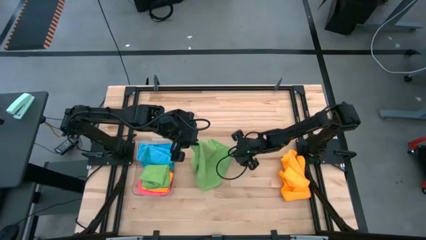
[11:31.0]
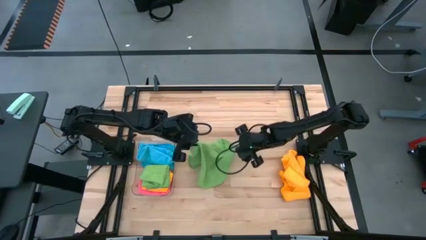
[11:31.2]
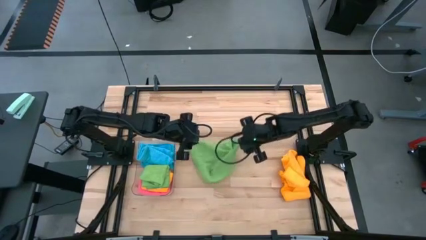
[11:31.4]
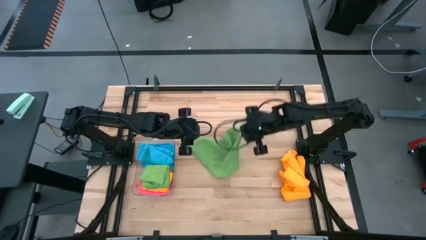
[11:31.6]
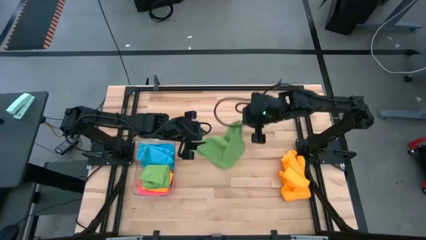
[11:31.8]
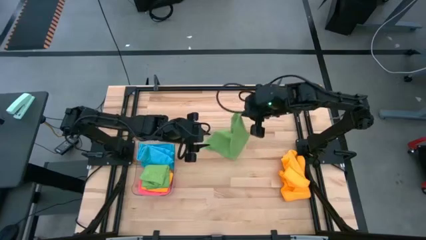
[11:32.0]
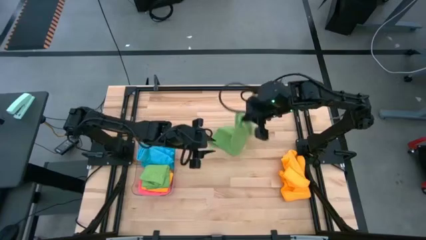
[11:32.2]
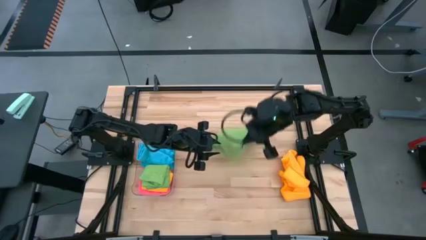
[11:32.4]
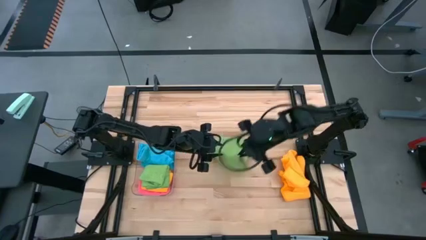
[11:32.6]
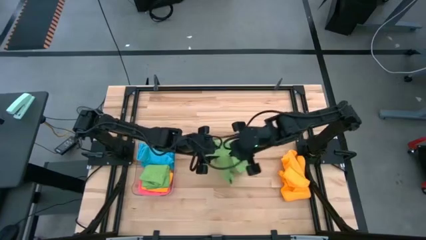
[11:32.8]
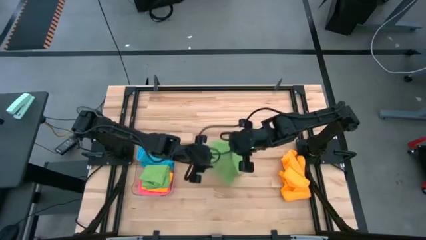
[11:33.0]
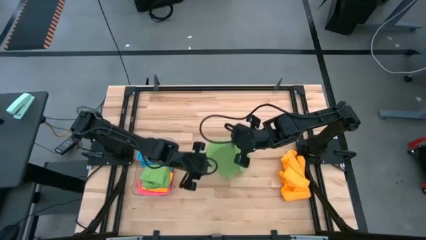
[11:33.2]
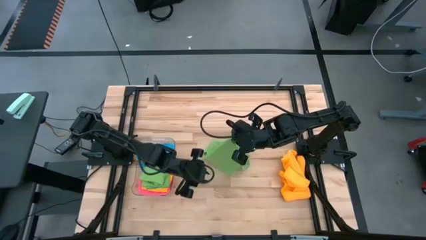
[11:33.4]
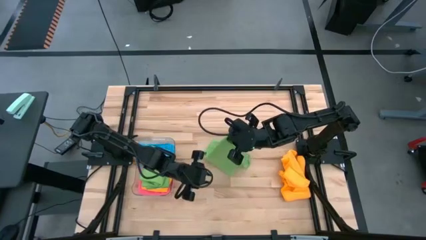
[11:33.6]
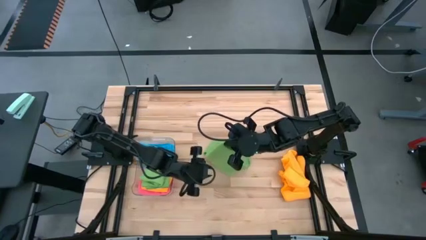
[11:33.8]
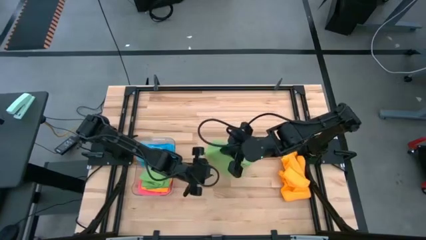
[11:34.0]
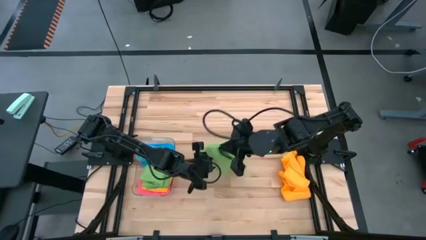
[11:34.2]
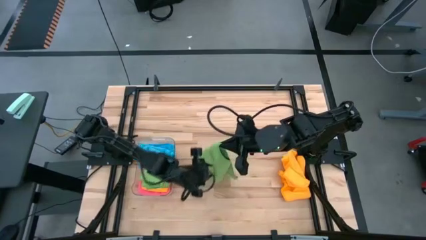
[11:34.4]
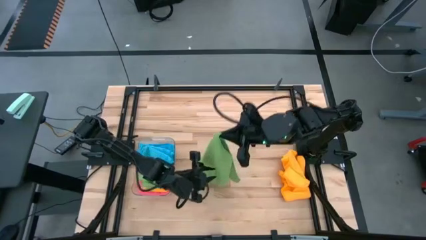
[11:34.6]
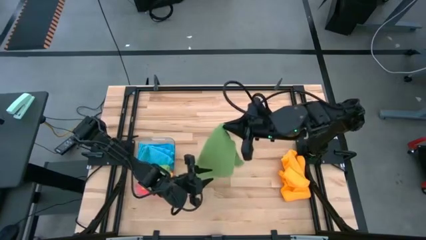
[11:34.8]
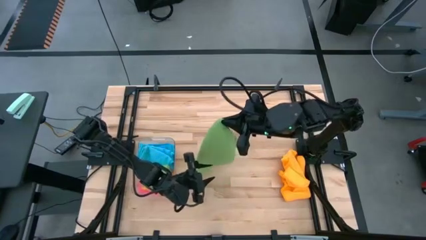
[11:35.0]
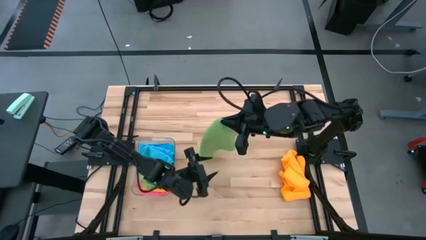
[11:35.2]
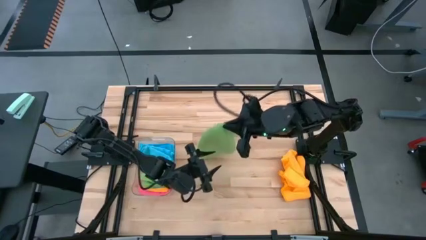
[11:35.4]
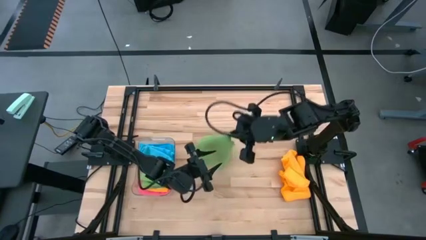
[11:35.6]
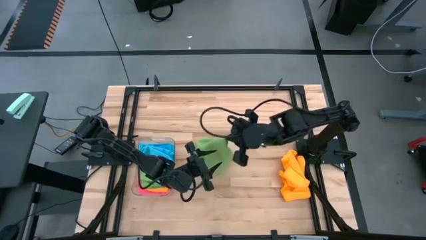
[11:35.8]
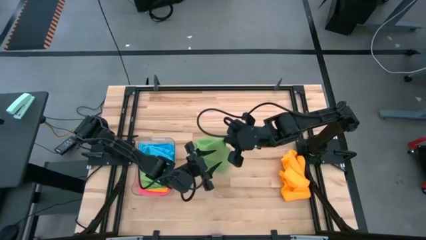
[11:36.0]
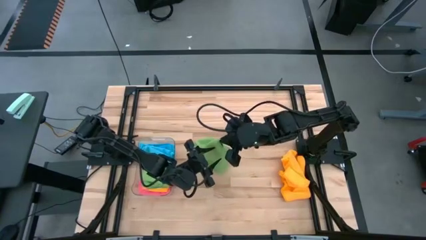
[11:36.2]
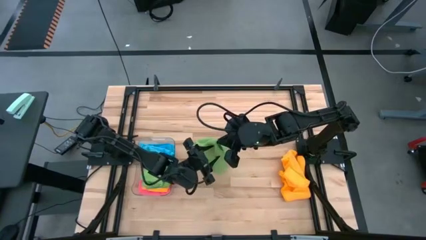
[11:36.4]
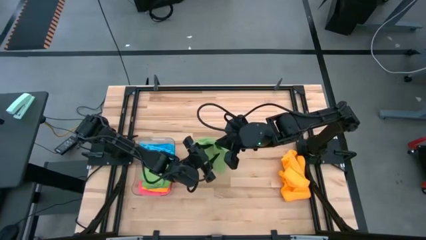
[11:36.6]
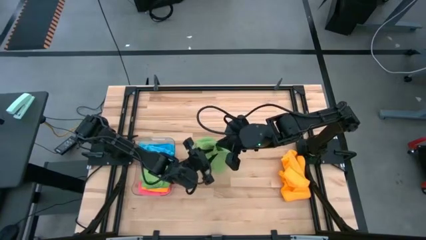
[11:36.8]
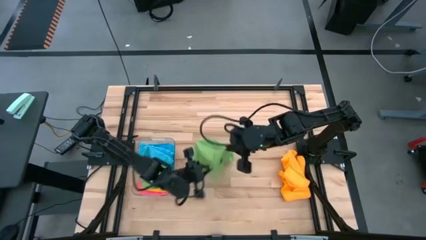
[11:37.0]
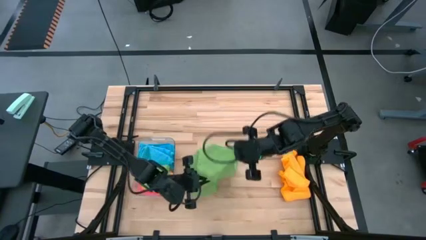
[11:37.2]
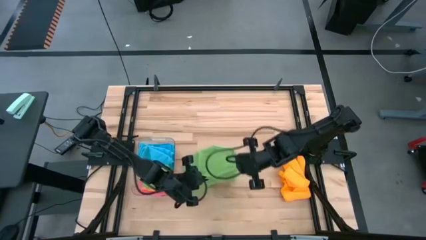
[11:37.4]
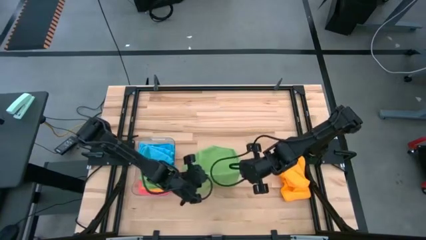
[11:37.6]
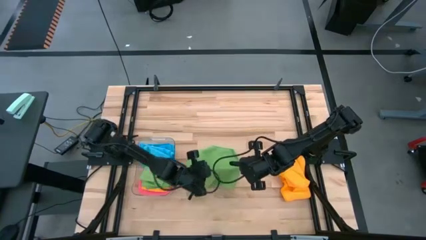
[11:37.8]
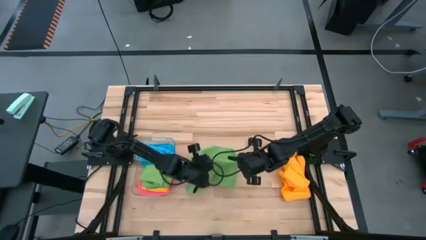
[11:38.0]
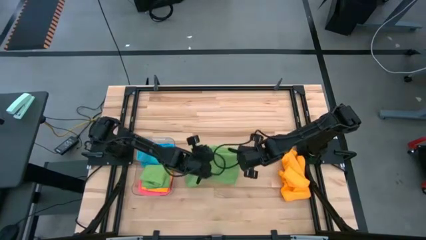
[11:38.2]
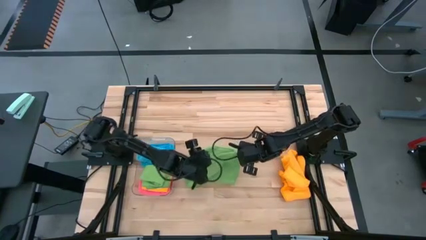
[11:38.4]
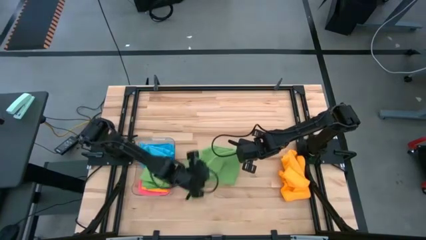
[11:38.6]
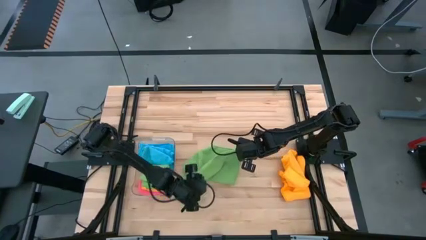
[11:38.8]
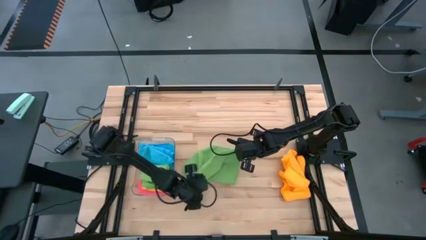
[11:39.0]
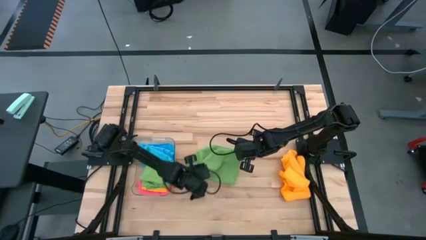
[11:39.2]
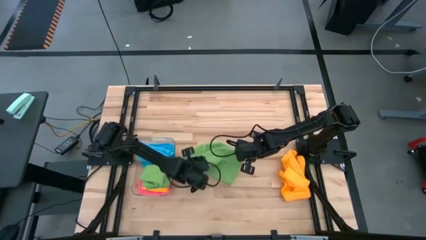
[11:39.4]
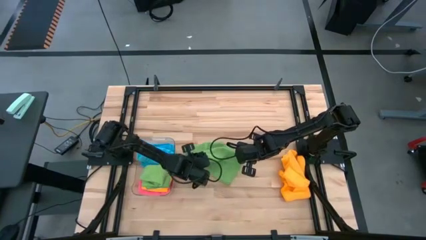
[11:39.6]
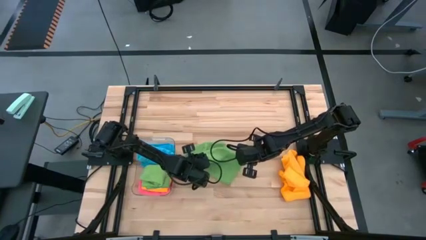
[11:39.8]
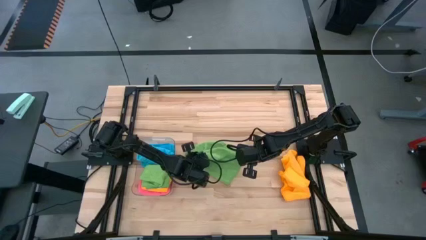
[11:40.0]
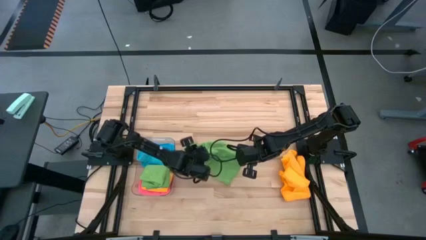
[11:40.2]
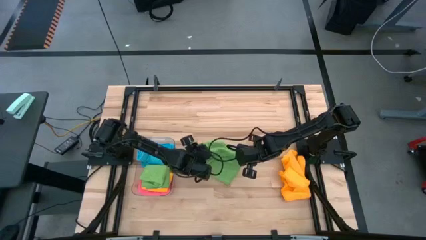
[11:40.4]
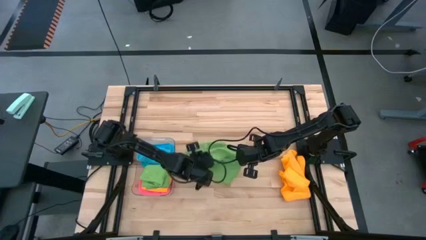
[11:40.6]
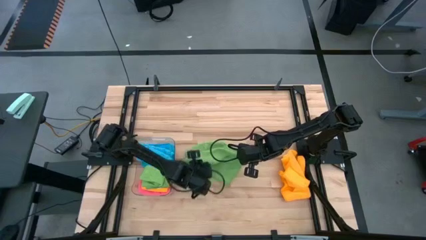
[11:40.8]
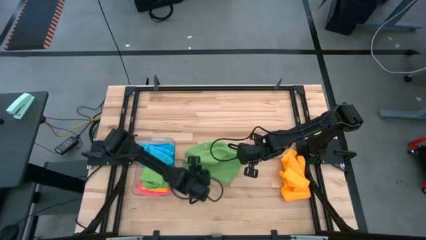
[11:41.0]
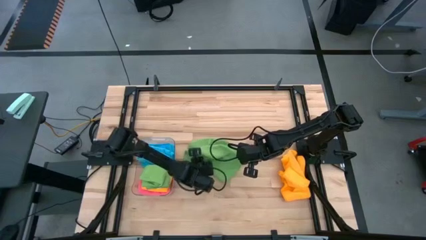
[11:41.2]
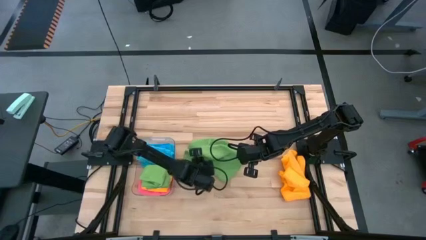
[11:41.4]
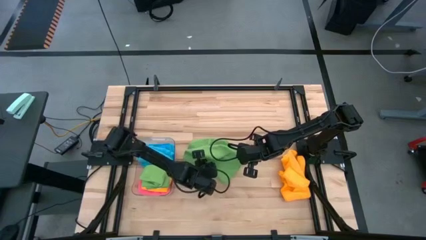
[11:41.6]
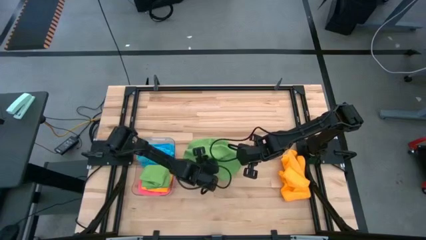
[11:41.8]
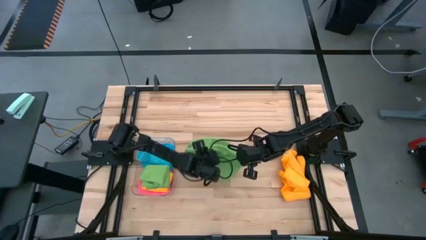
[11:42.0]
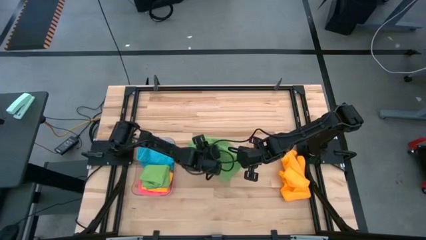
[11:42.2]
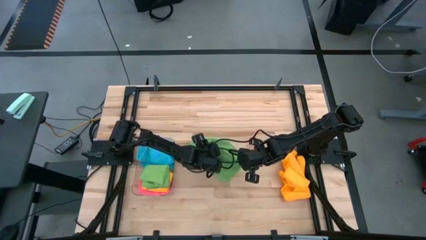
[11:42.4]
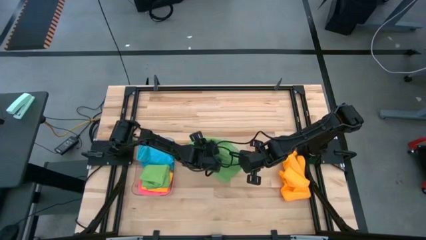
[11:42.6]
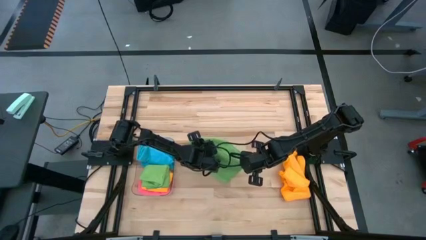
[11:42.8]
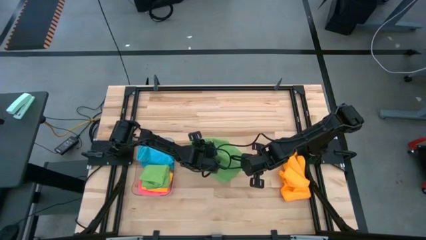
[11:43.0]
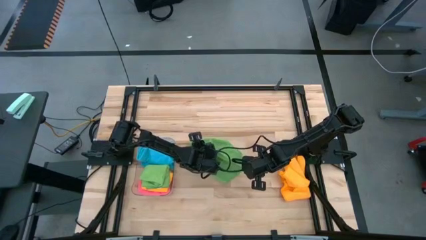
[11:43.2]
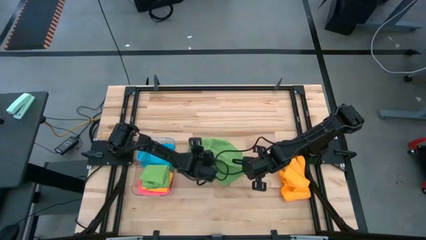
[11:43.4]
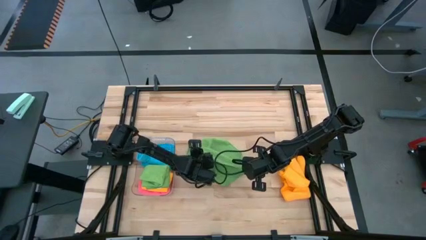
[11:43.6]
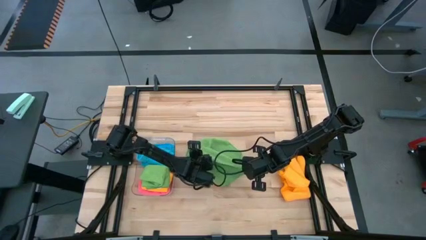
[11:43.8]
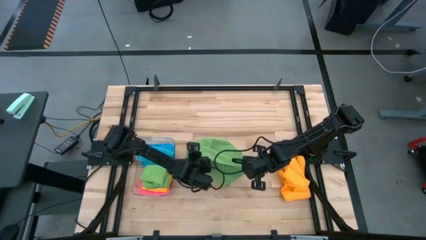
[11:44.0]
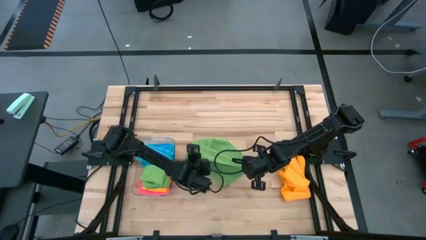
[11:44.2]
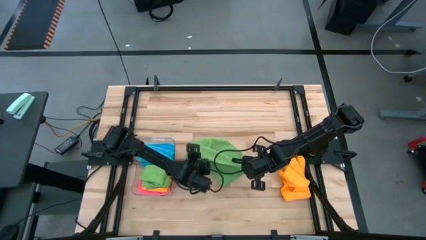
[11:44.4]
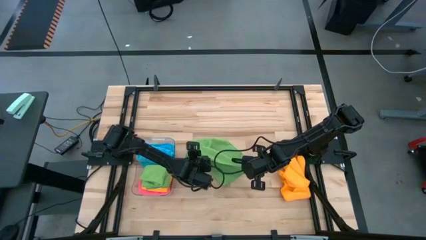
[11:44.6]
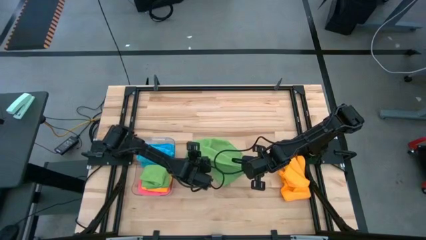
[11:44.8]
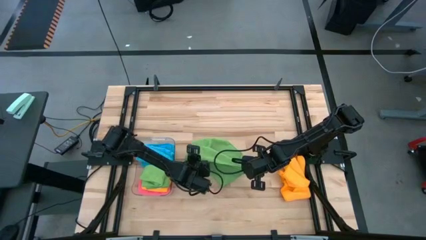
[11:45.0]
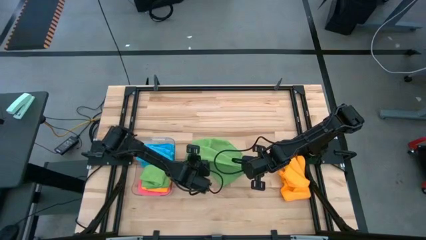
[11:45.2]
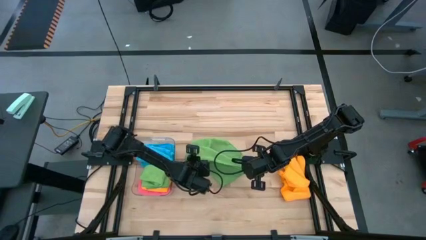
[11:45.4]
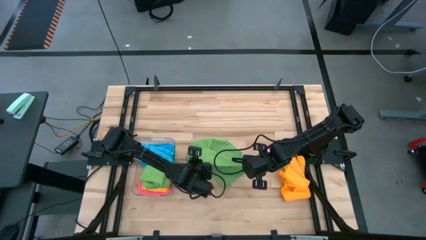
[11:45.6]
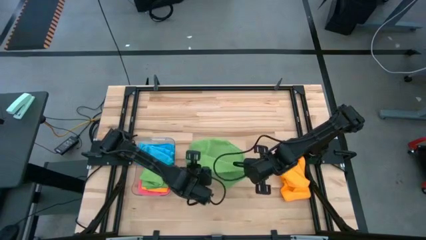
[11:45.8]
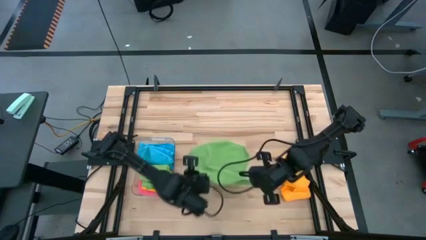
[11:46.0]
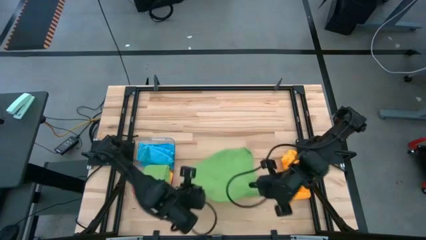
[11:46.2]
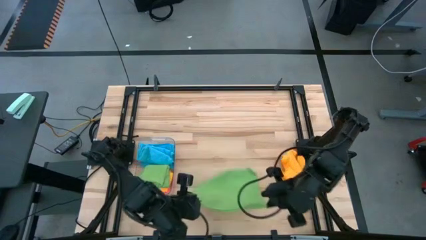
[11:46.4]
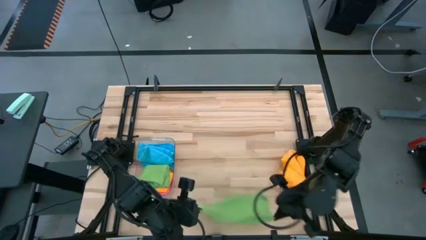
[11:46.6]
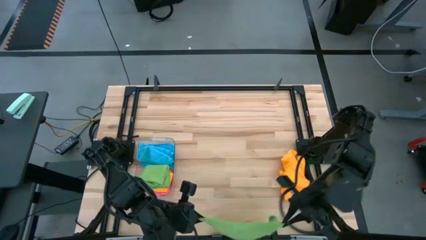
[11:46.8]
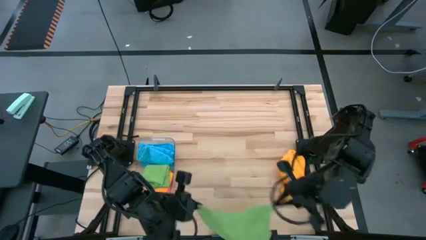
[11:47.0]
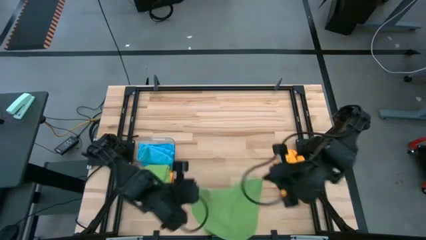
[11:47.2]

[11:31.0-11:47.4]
Task: Fold microfiber towels
Fold the green microfiber cloth
